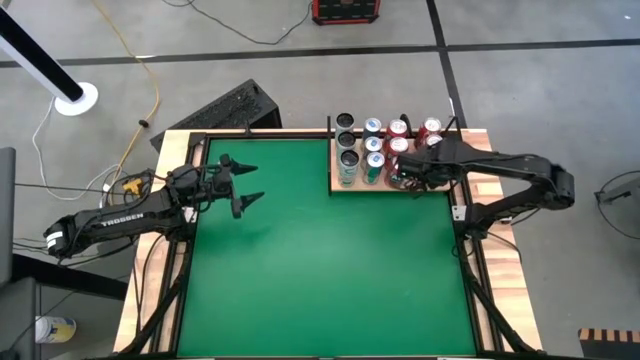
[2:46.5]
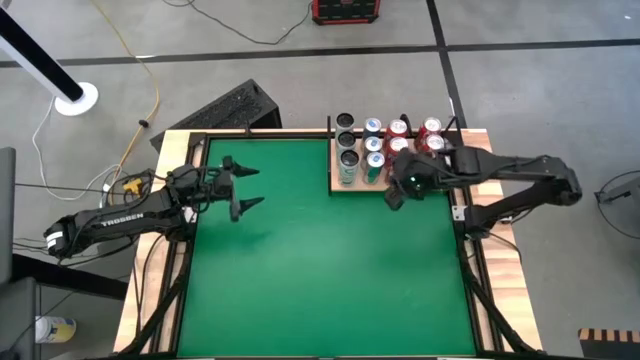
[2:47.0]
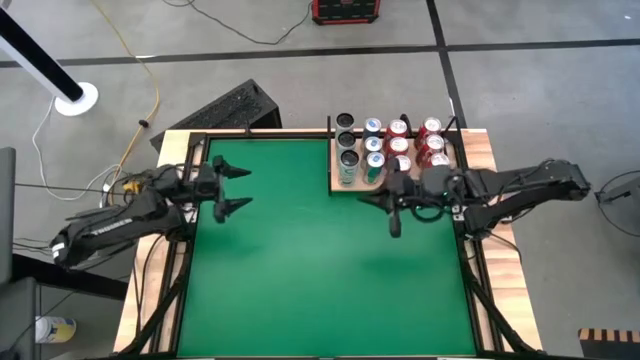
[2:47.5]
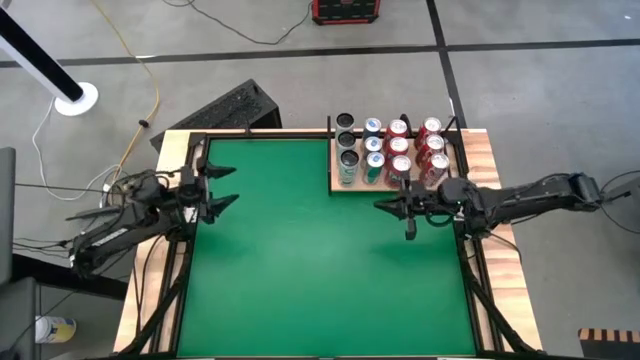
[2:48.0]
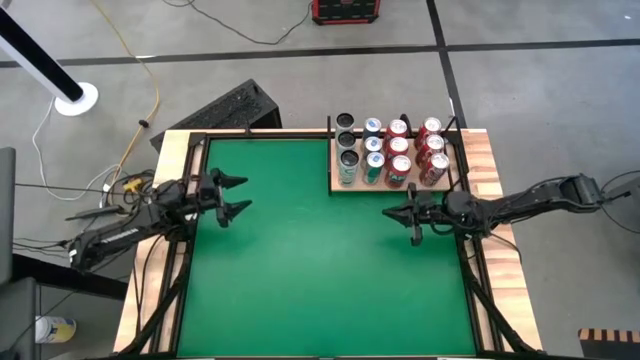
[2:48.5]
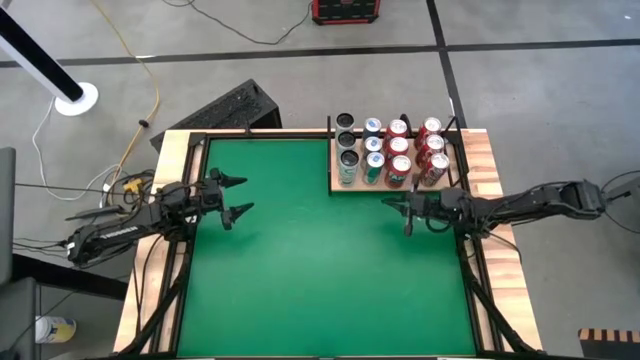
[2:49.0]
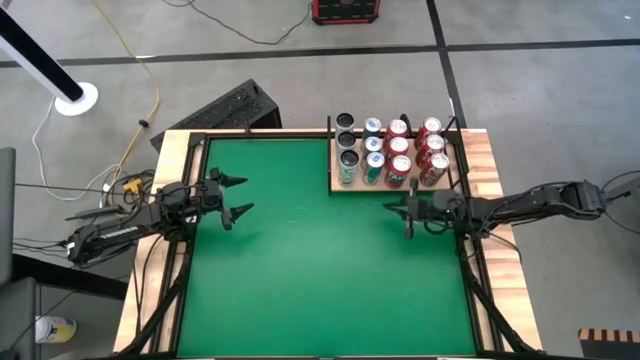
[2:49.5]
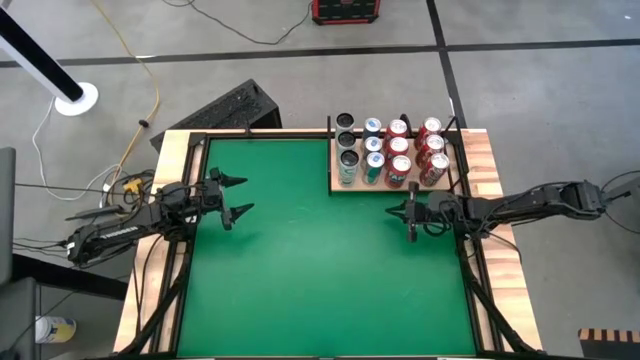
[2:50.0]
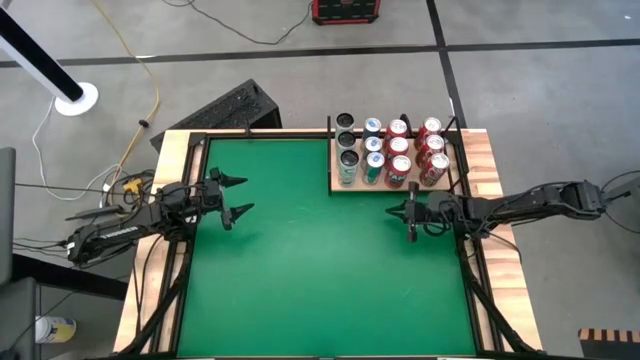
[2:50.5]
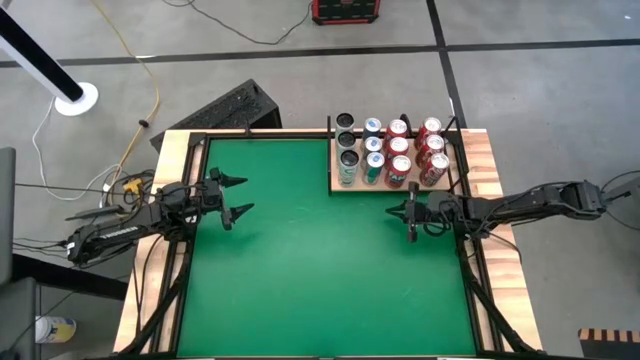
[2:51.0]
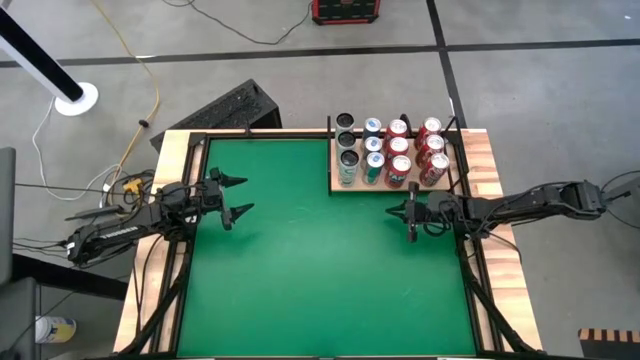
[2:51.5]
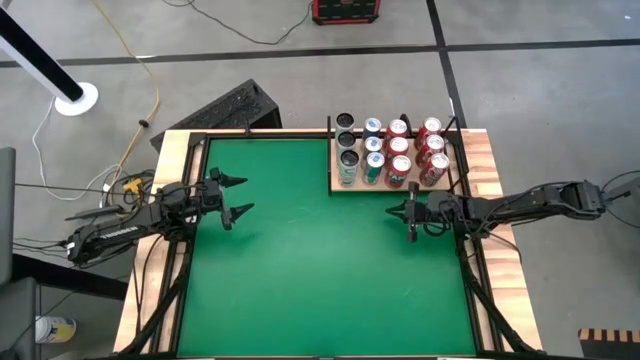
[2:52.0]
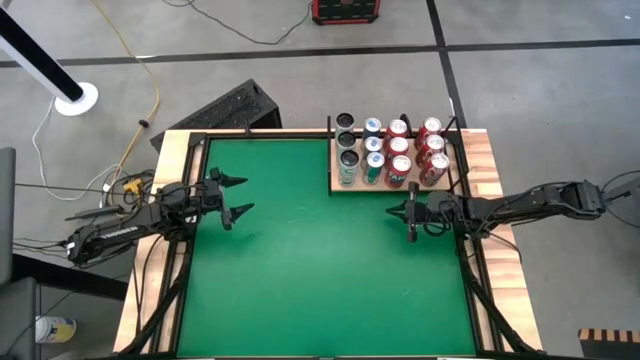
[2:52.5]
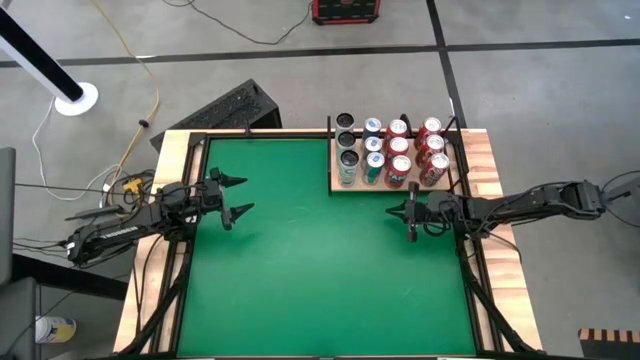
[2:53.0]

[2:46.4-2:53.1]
Task: Sort soda cans
Return to Home Position

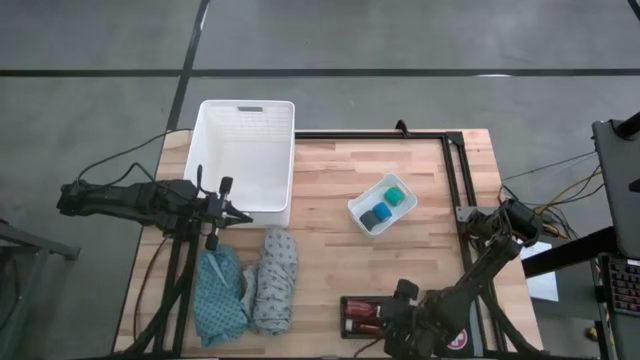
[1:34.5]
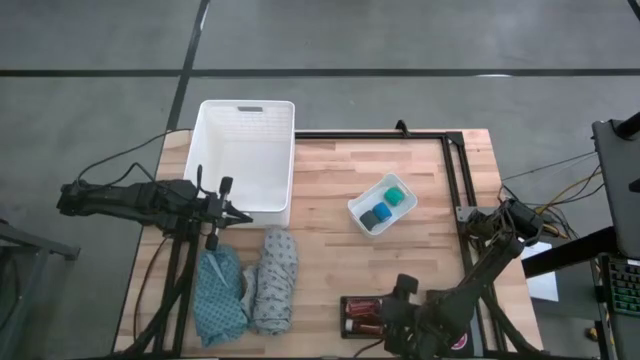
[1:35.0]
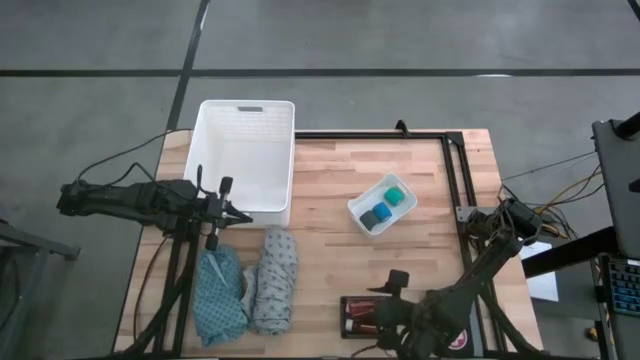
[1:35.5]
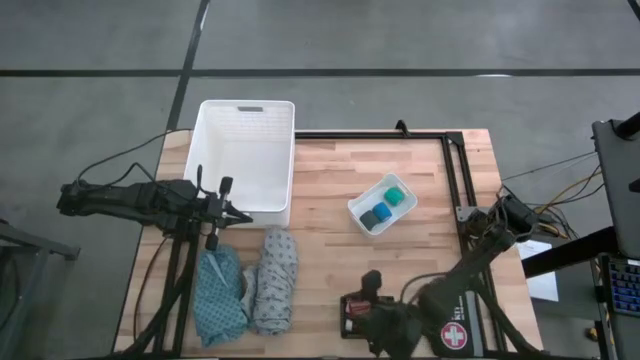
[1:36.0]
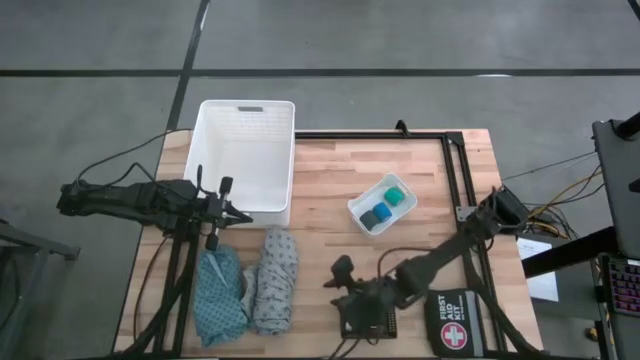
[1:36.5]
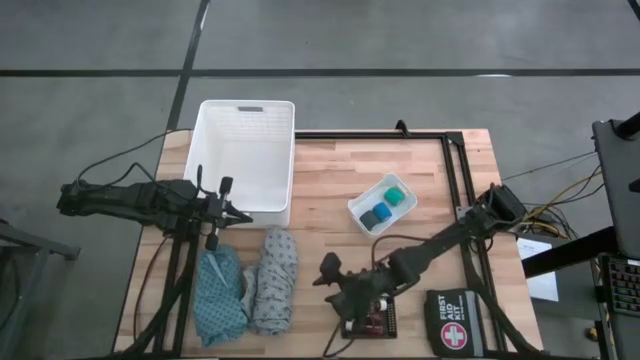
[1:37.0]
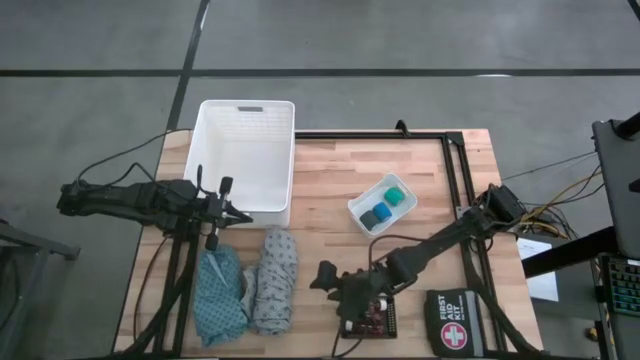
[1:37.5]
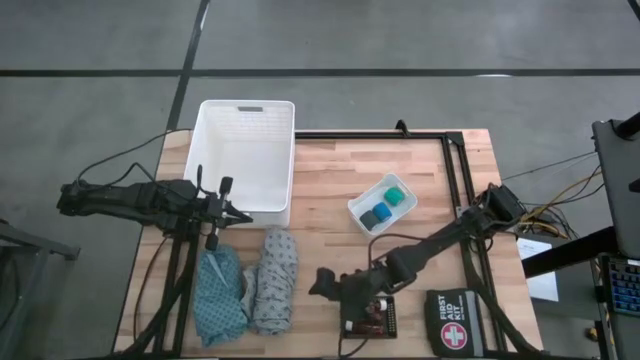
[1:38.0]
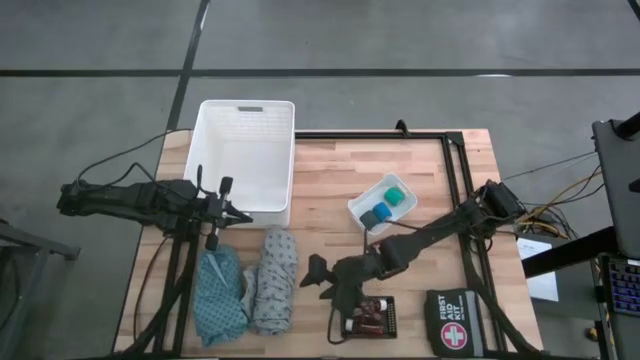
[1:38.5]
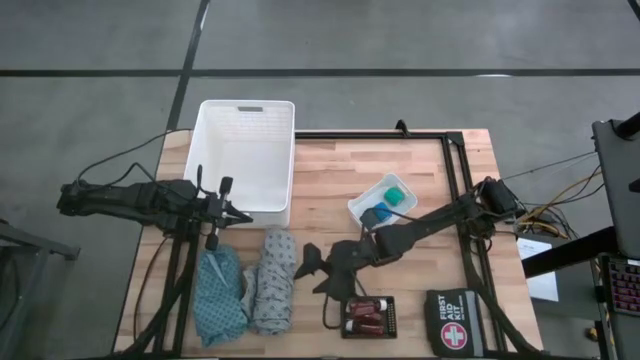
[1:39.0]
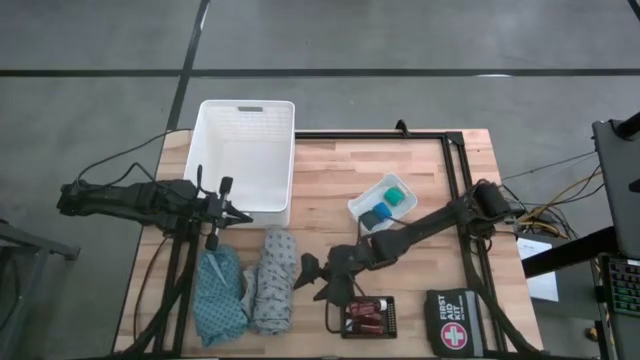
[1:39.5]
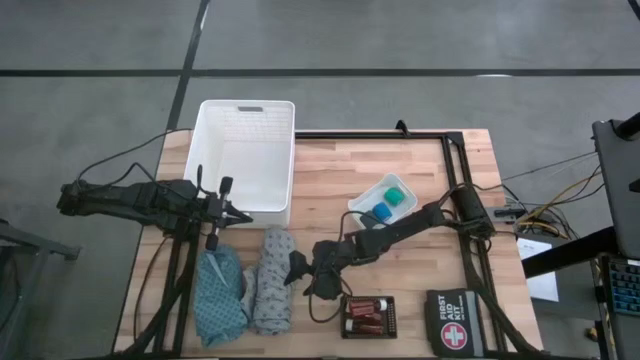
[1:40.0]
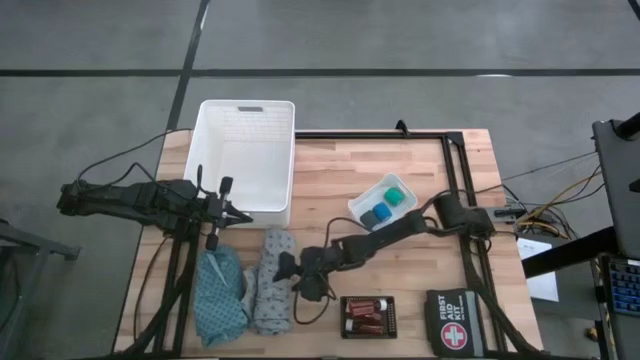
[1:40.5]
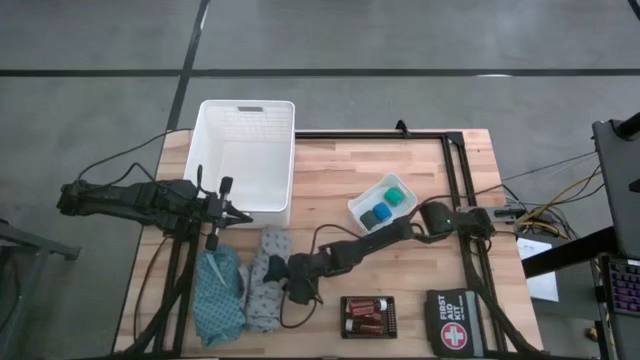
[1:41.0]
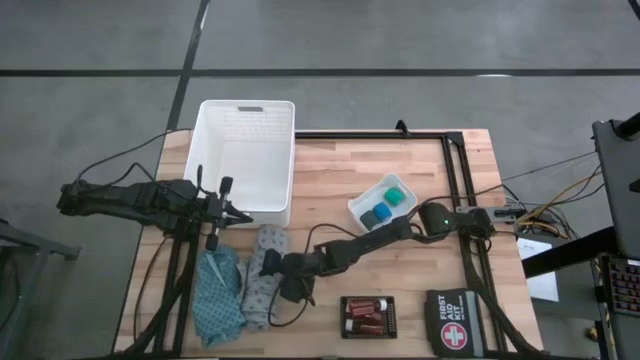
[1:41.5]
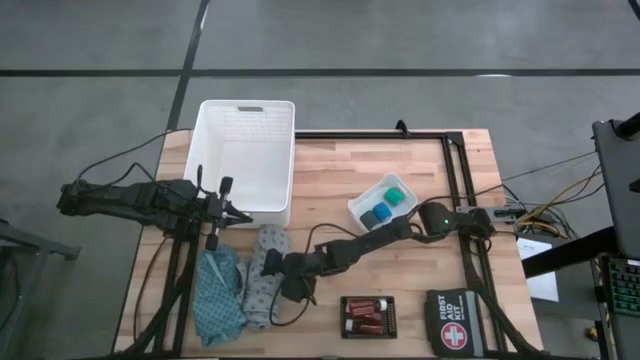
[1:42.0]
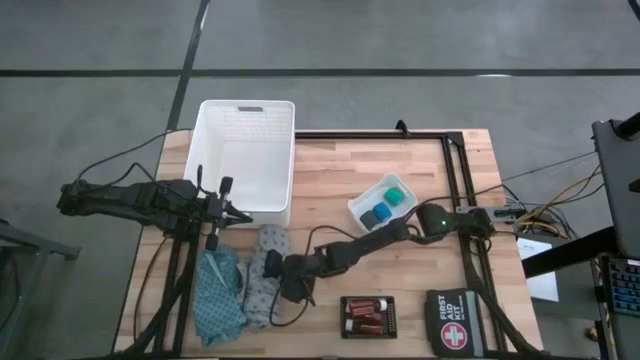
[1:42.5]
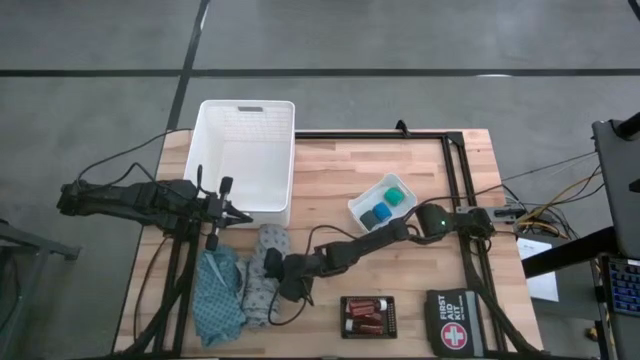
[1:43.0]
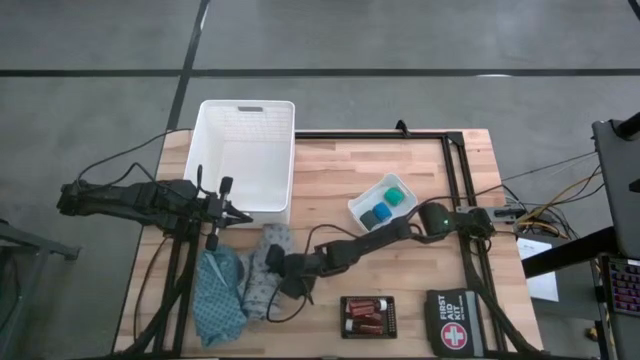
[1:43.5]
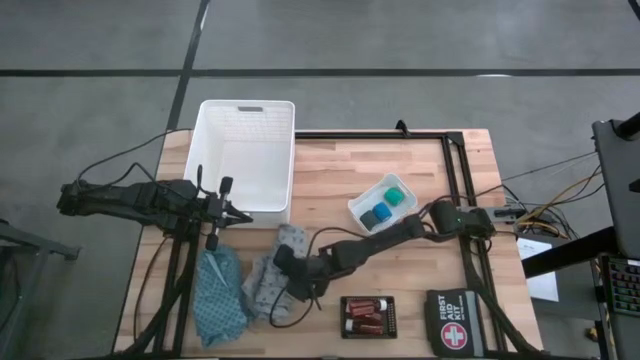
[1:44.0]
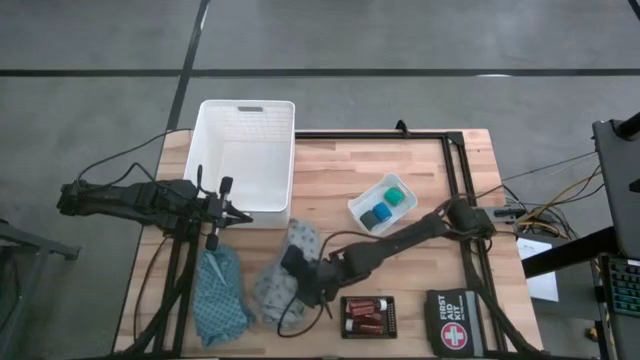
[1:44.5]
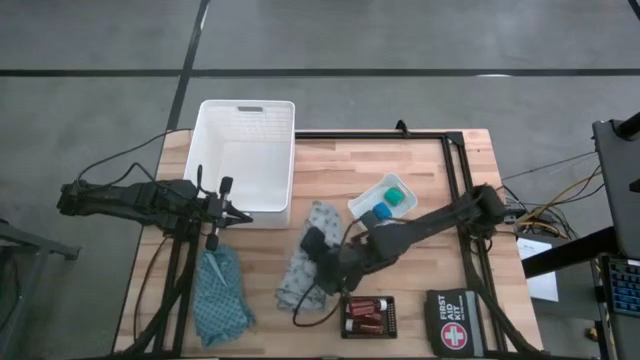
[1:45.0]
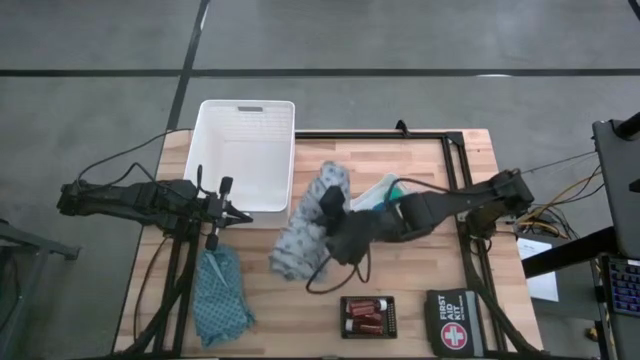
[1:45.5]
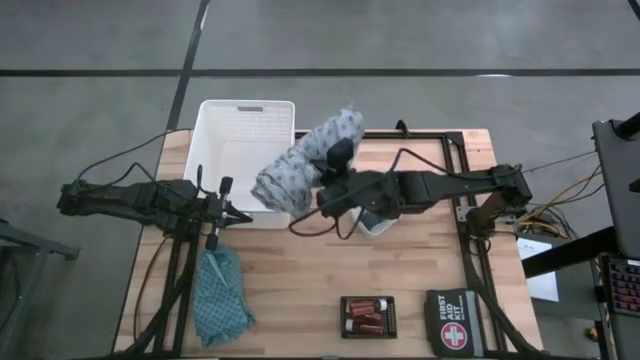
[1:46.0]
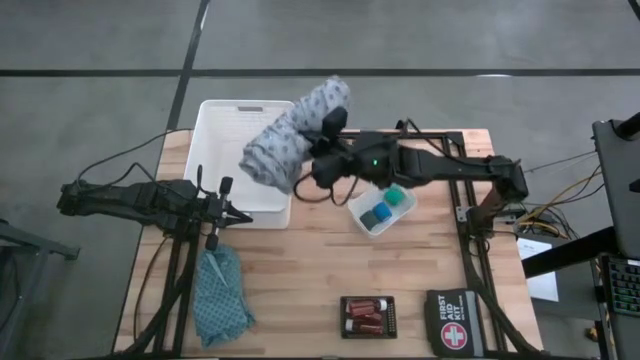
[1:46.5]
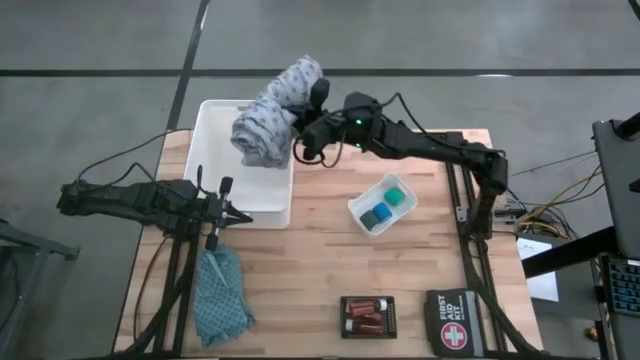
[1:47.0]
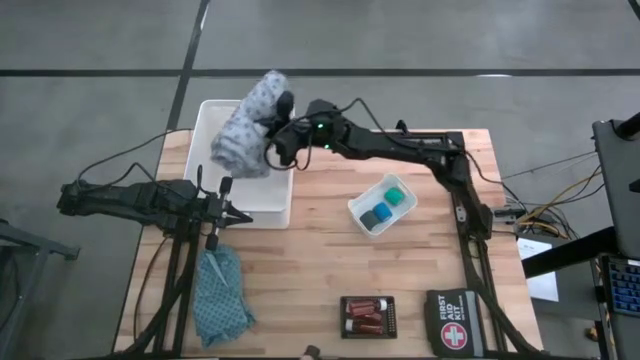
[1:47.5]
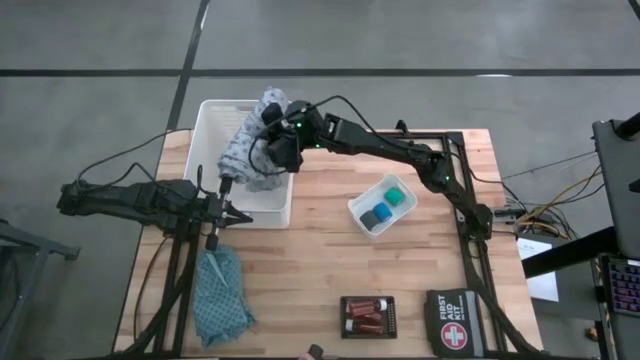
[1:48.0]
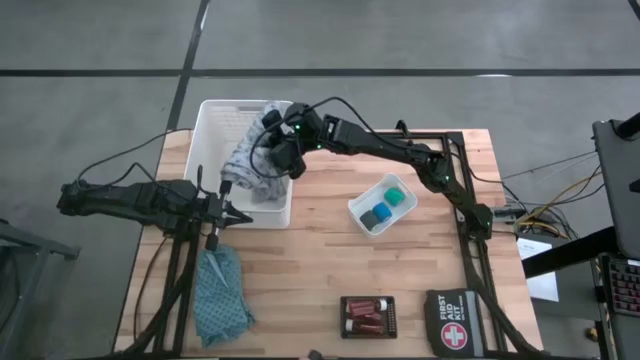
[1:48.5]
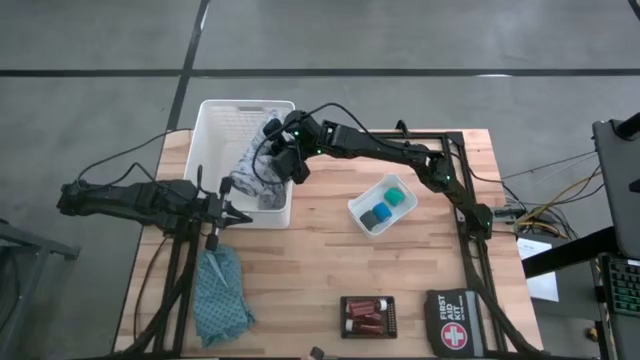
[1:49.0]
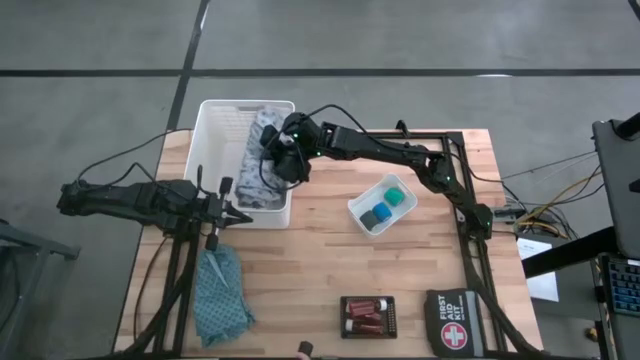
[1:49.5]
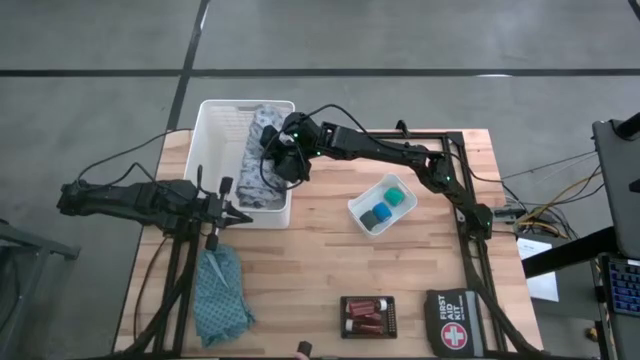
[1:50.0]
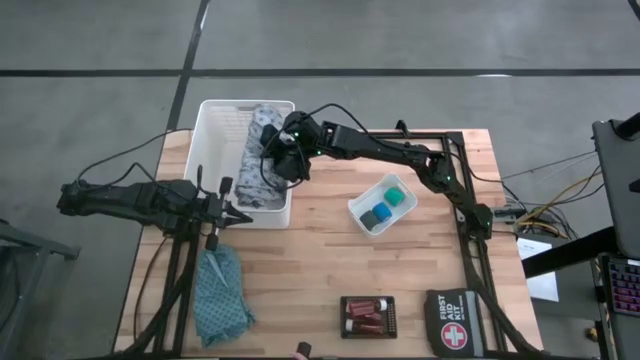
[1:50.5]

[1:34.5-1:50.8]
Task: Pick & place medical supplies in basket/bin
Put the gray patient gown into the large white bin
